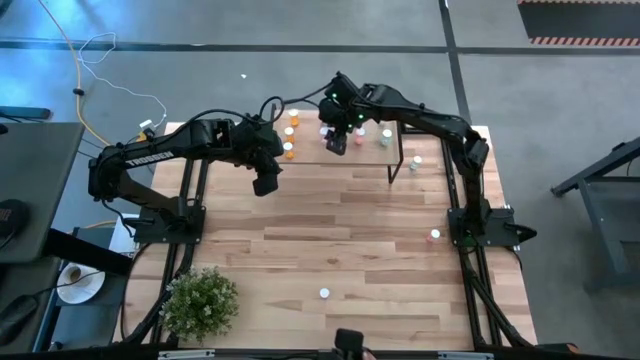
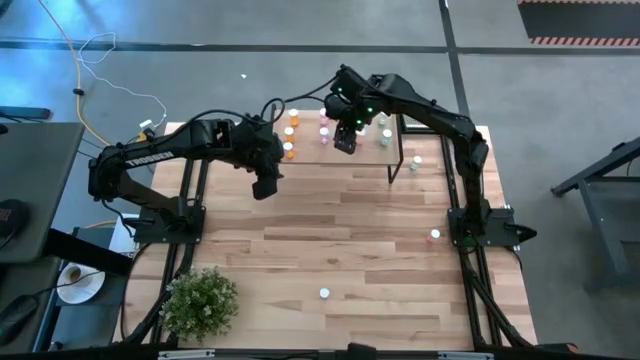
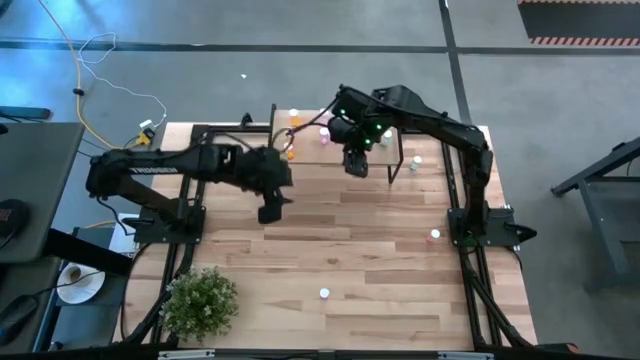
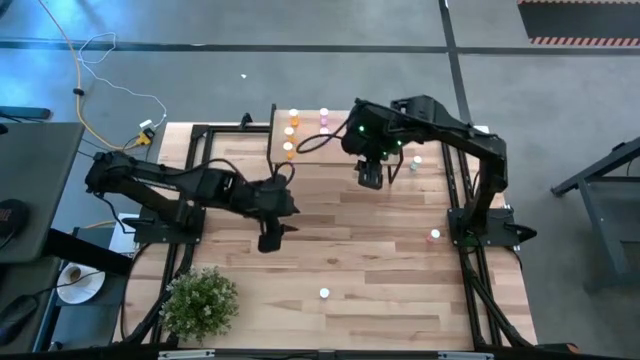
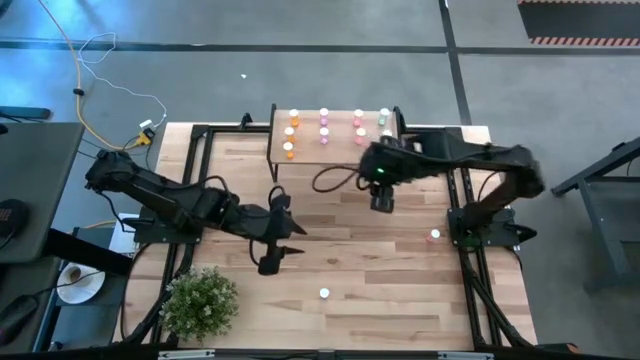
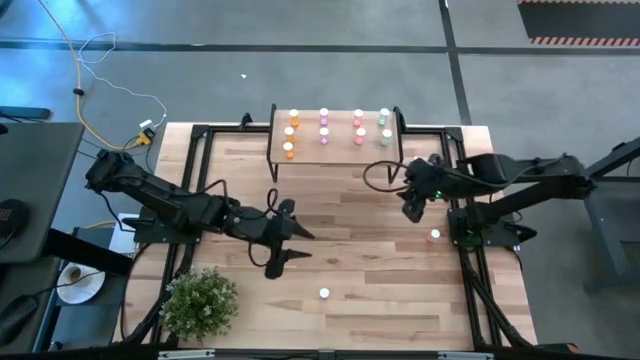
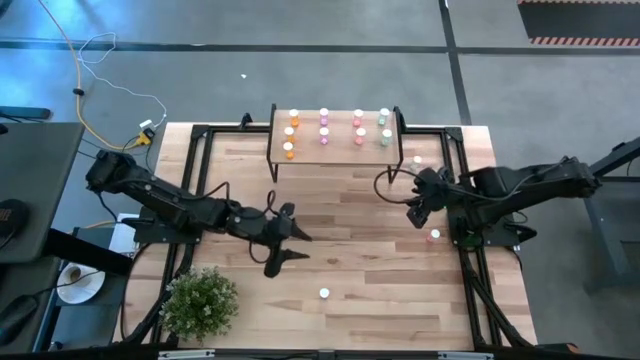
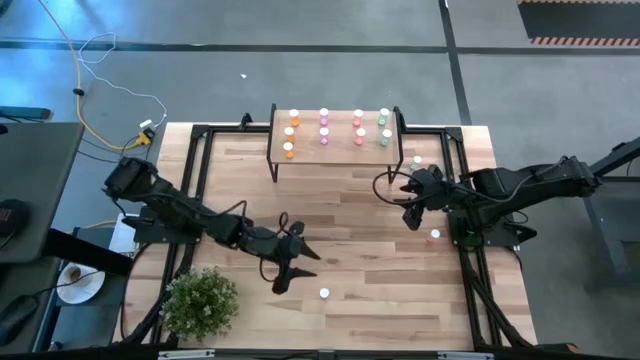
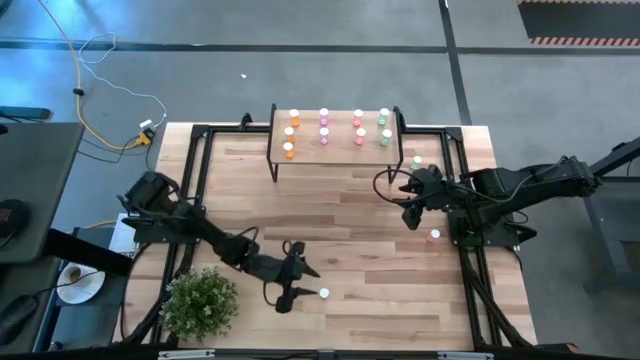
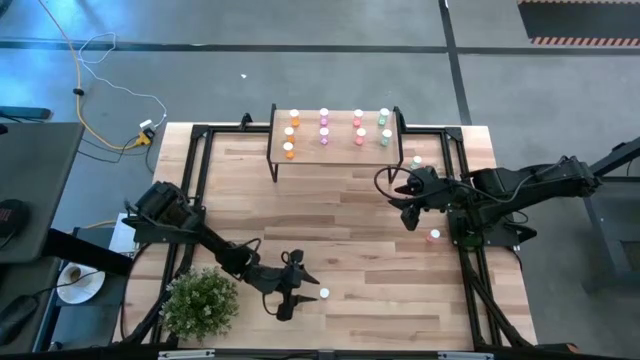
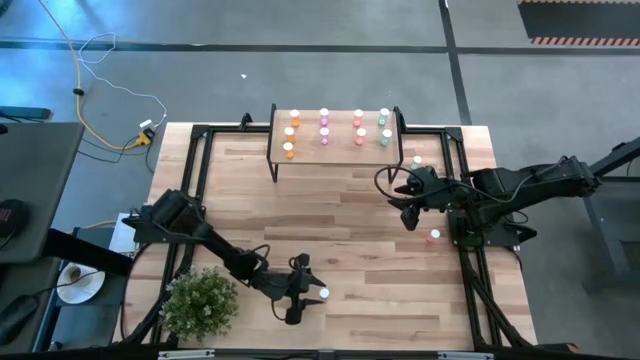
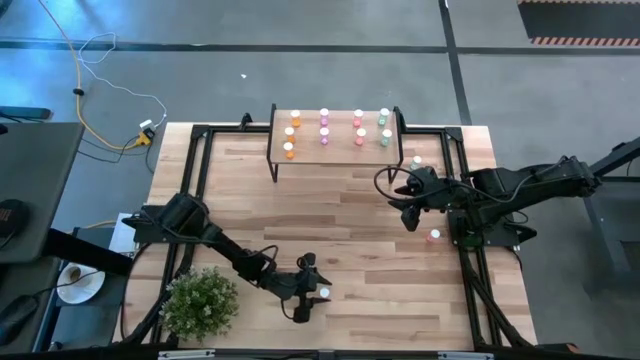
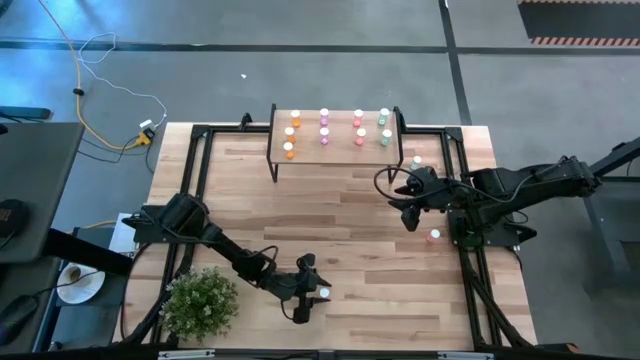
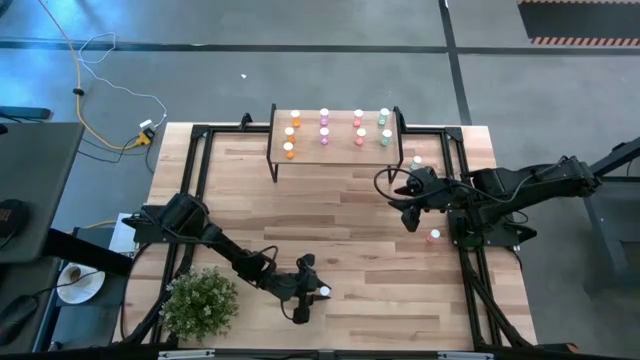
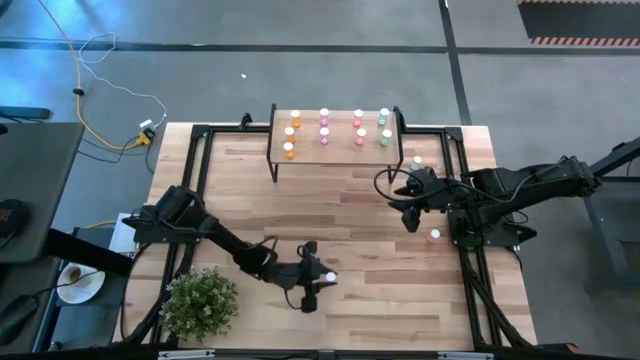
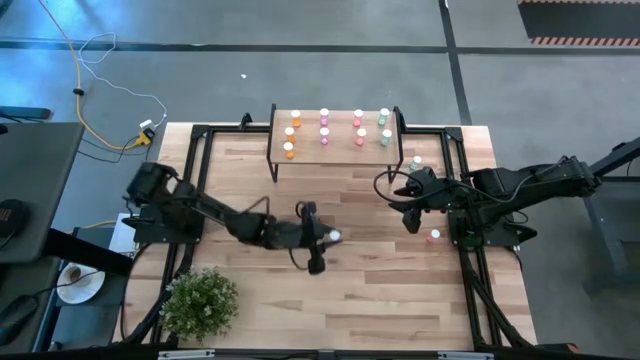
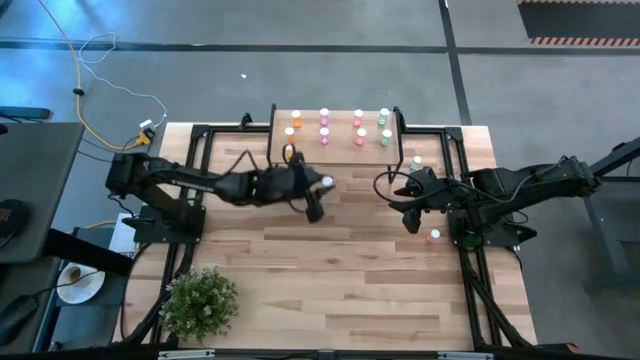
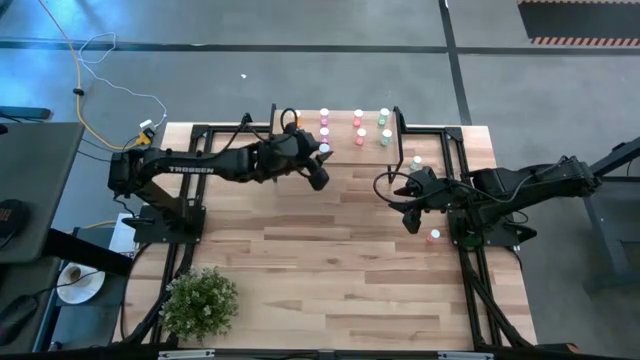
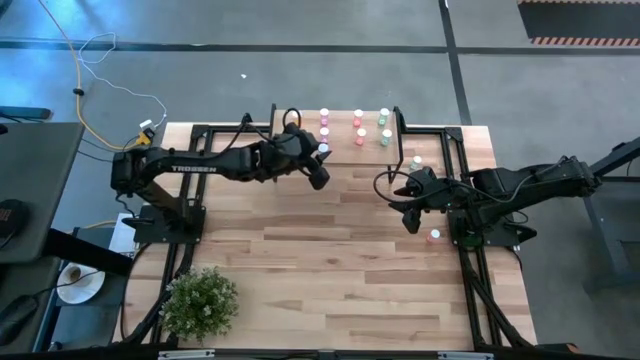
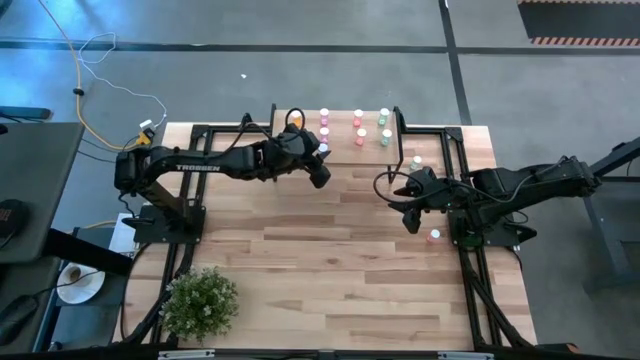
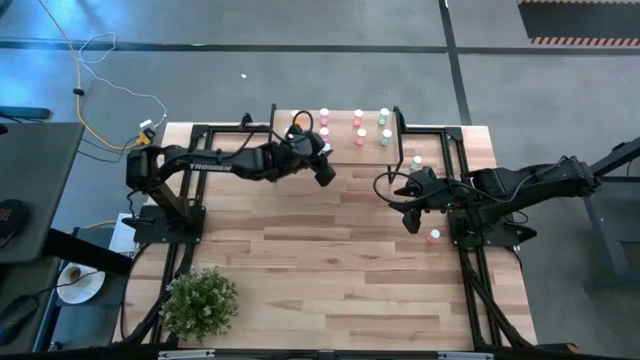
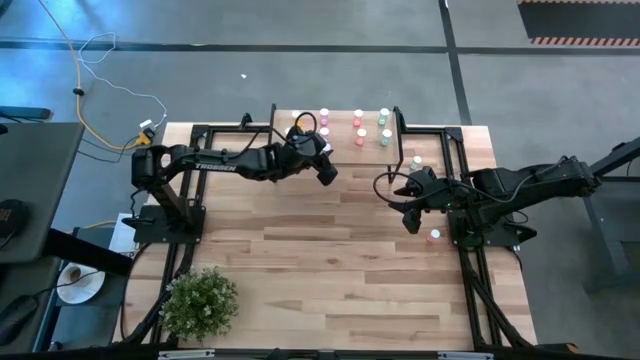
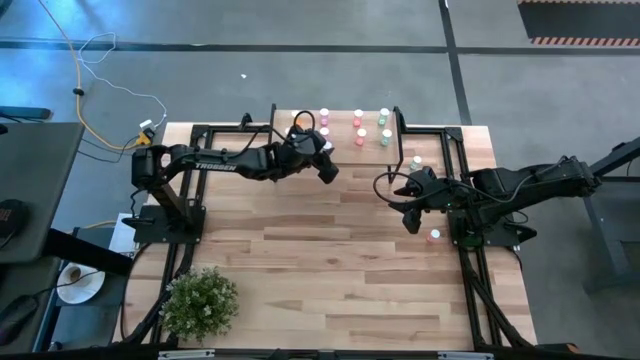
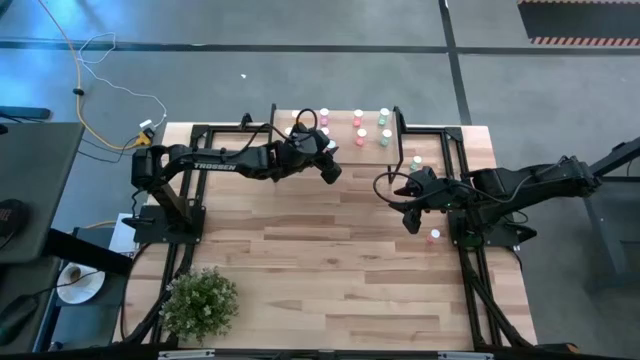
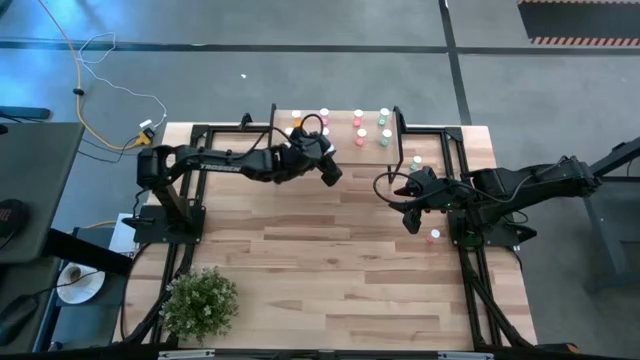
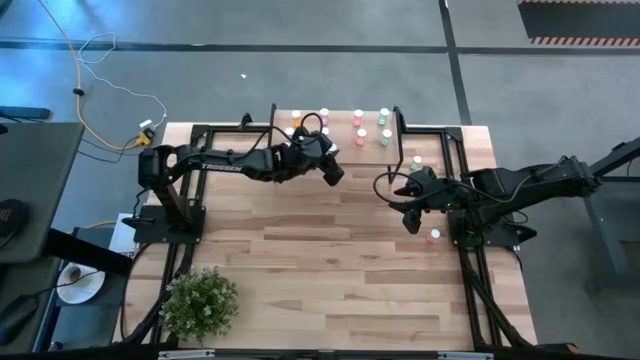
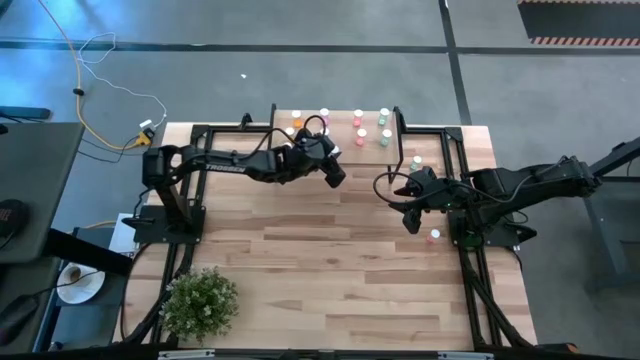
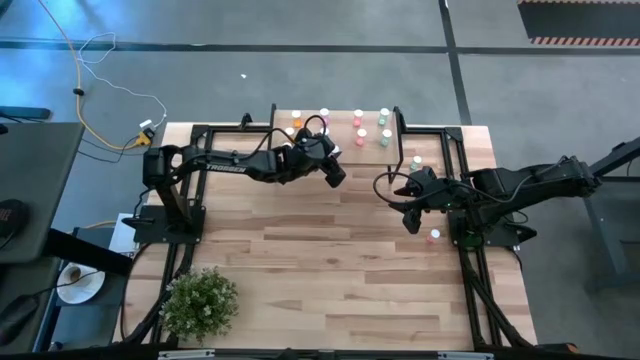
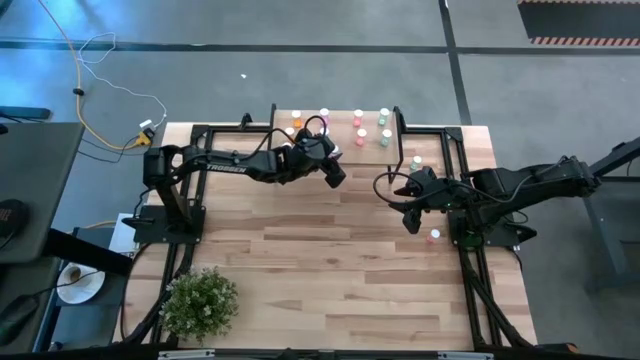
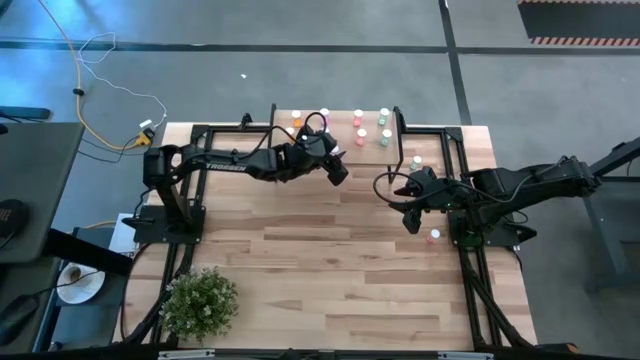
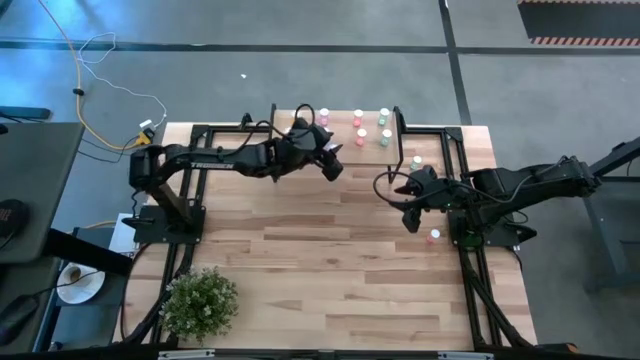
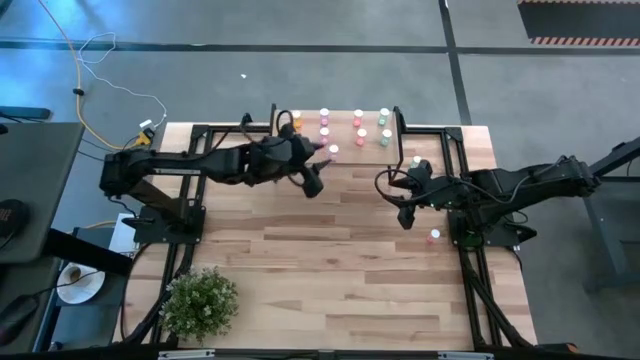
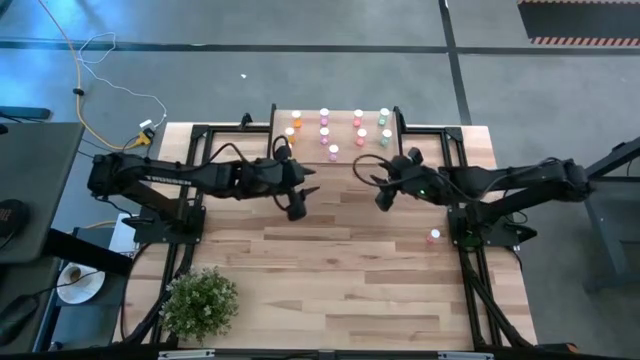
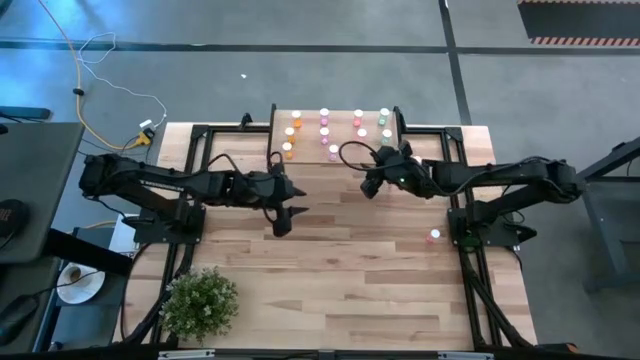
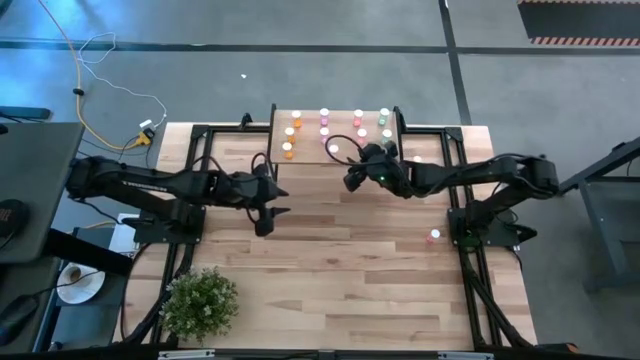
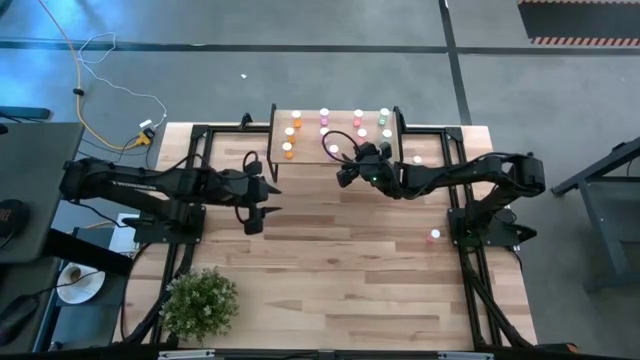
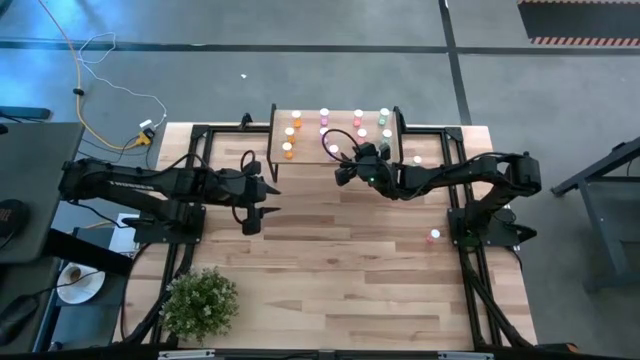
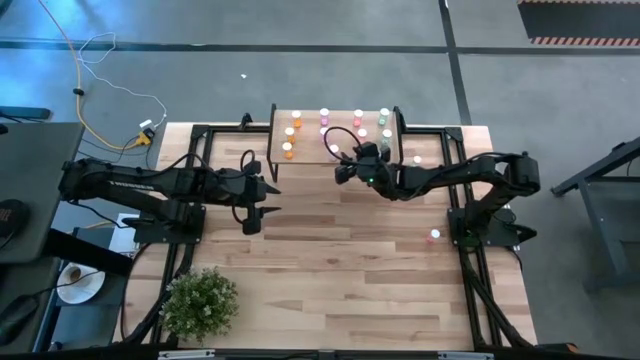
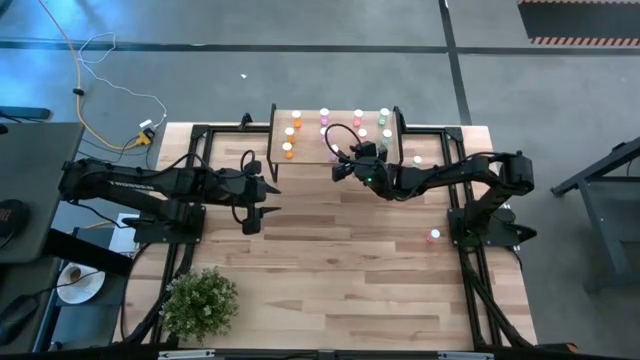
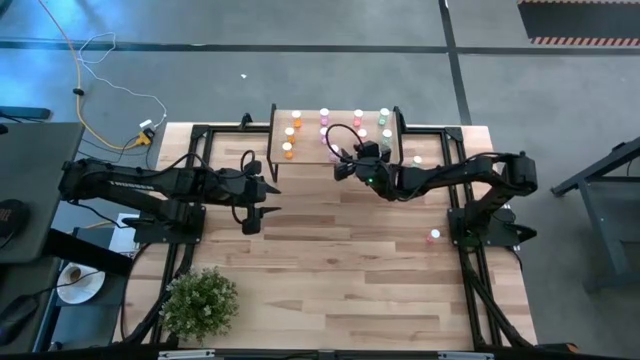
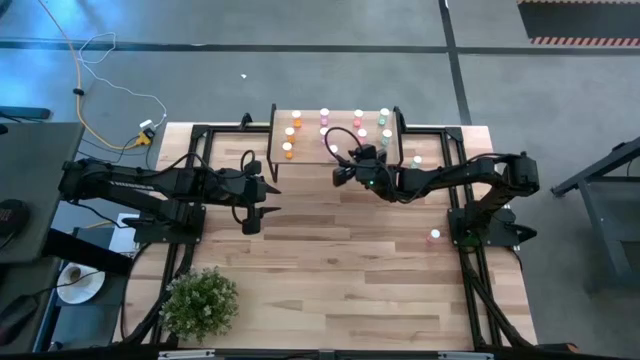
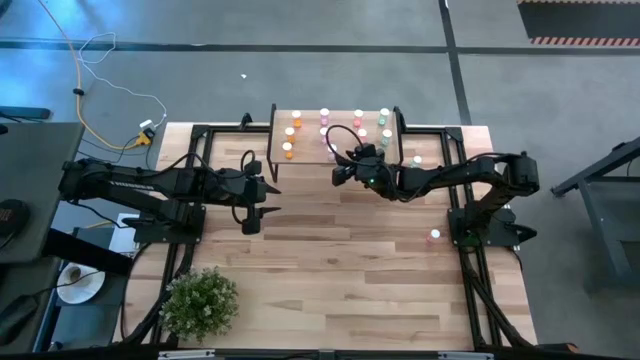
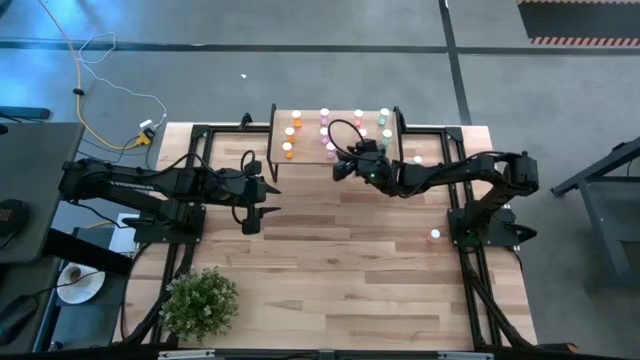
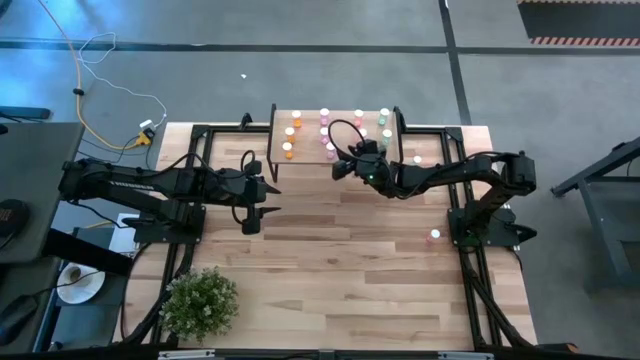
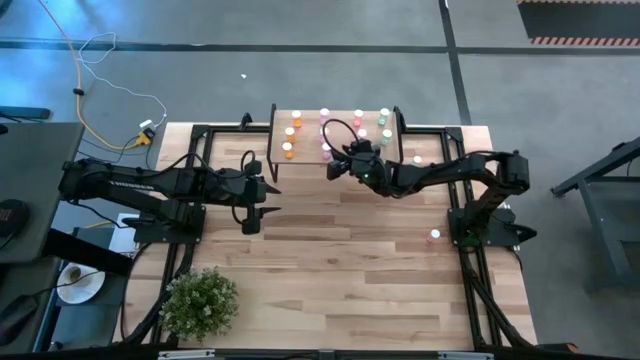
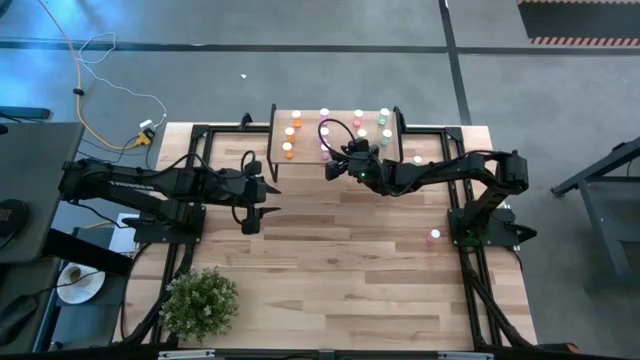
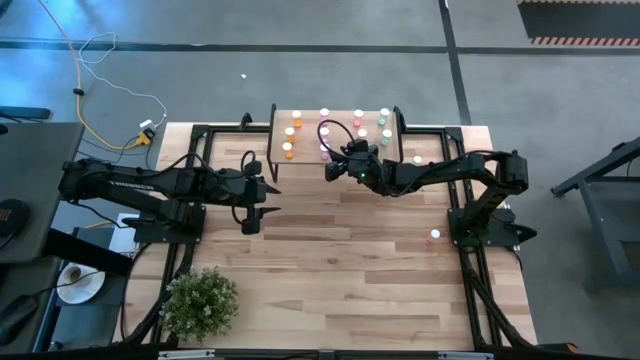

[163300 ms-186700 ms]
Task: Pick and place medicine bottles onto shelf by color
Put the purple pill bottle on the shelf aligned with the other purple pill bottles
